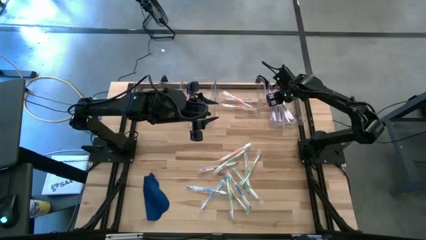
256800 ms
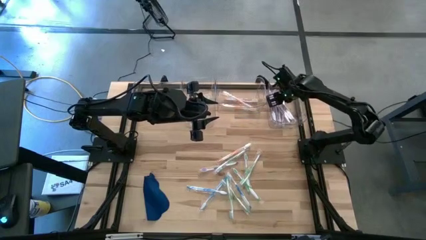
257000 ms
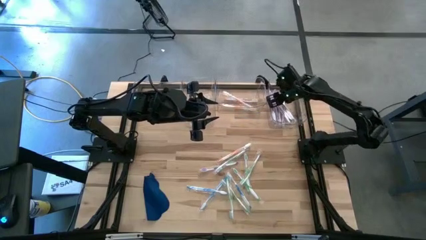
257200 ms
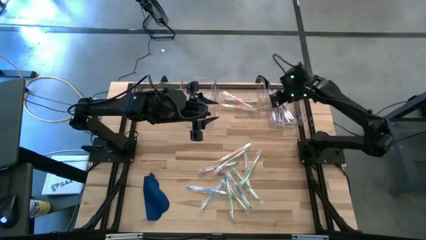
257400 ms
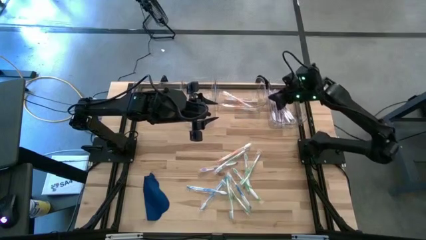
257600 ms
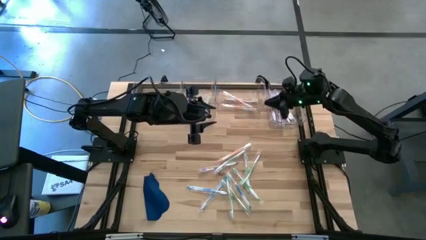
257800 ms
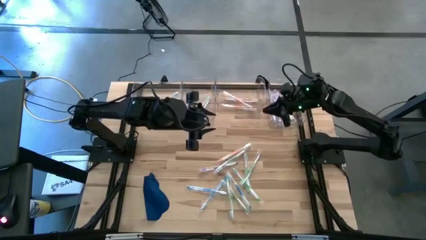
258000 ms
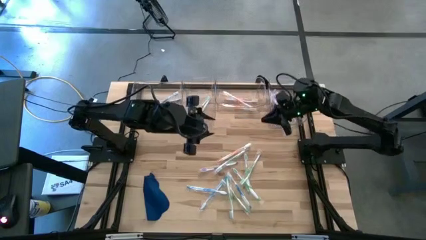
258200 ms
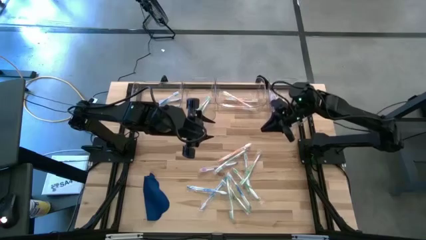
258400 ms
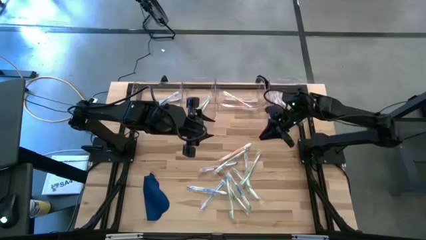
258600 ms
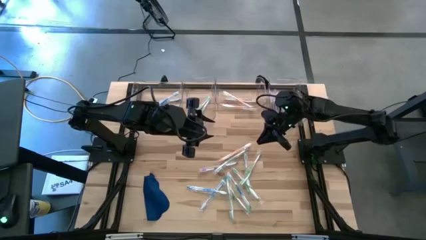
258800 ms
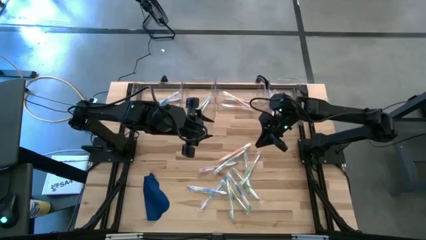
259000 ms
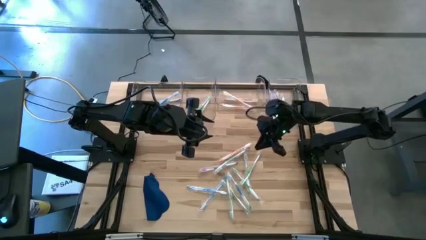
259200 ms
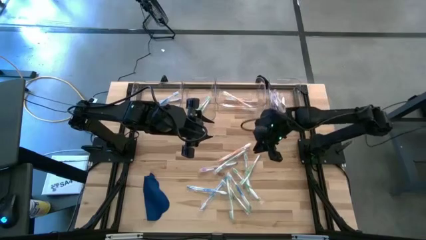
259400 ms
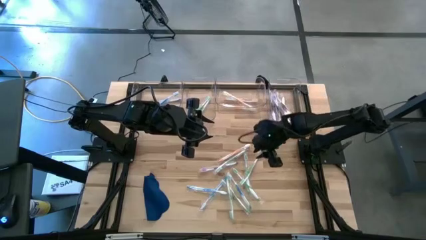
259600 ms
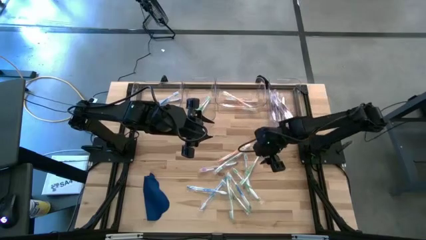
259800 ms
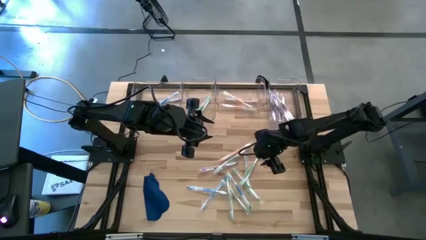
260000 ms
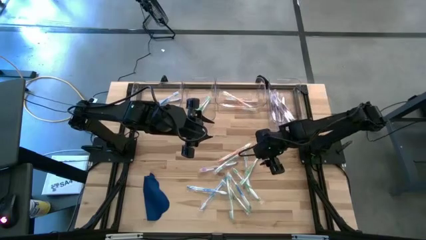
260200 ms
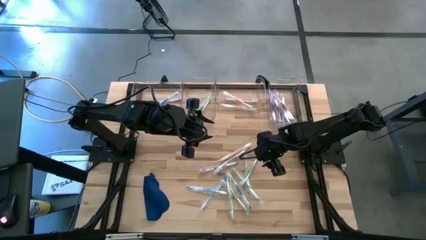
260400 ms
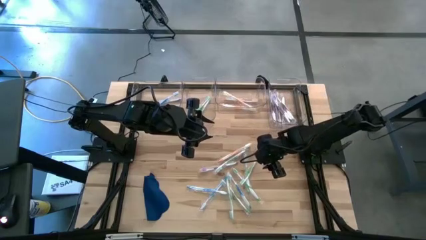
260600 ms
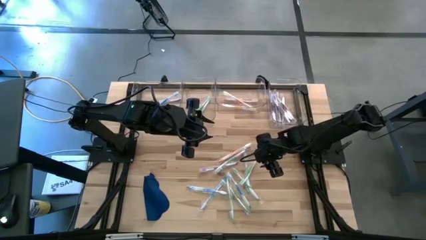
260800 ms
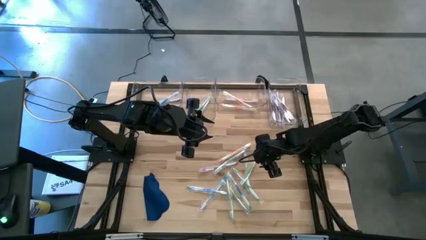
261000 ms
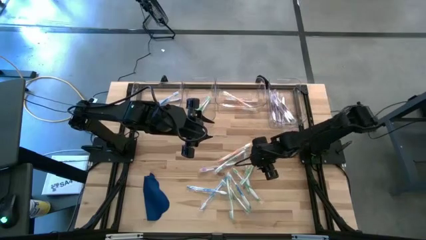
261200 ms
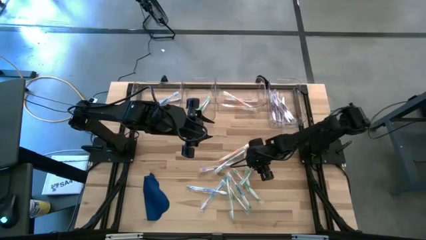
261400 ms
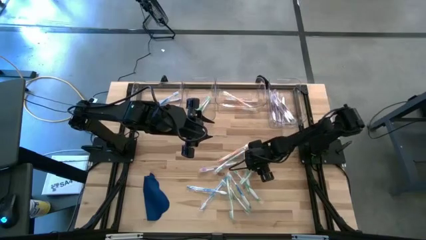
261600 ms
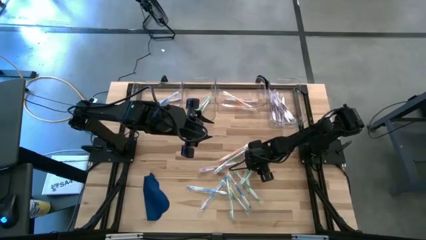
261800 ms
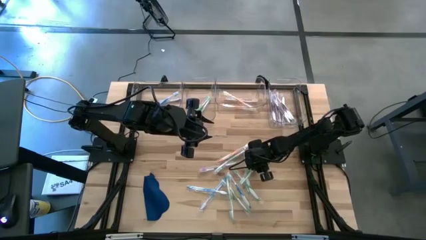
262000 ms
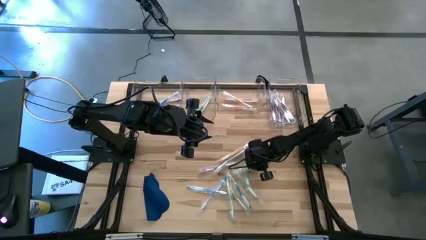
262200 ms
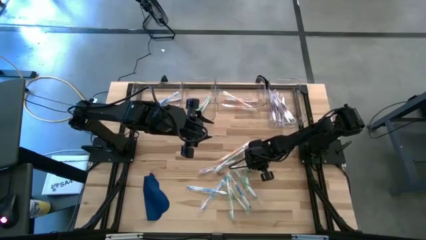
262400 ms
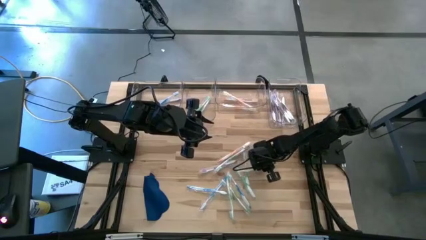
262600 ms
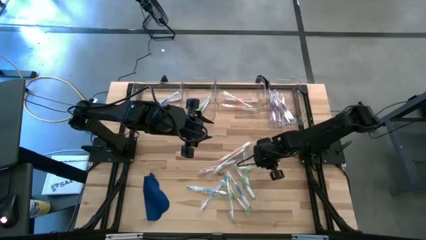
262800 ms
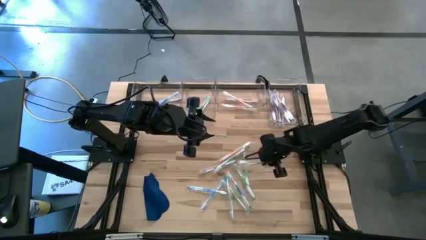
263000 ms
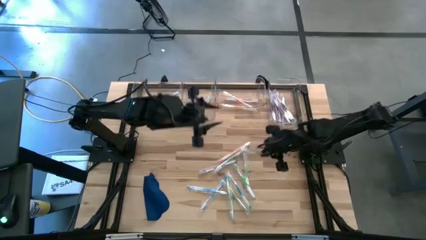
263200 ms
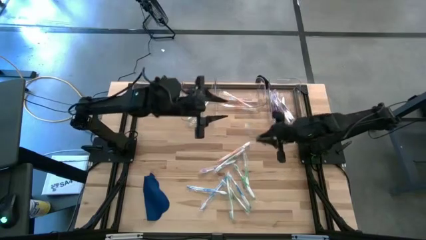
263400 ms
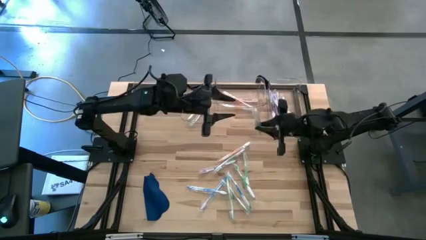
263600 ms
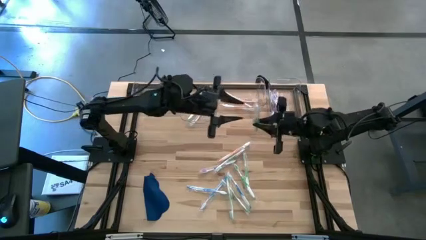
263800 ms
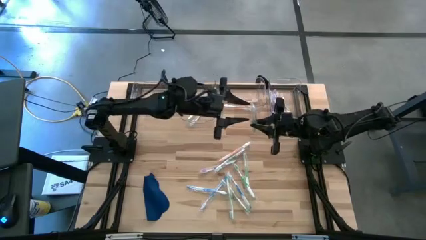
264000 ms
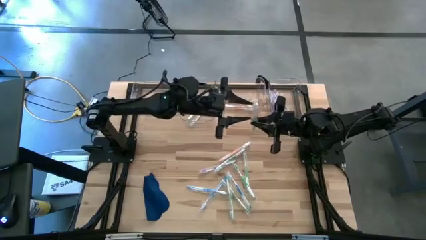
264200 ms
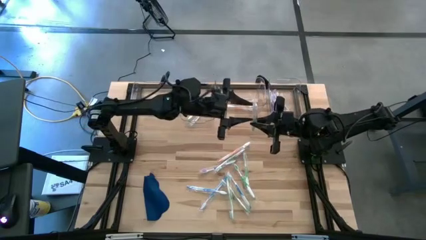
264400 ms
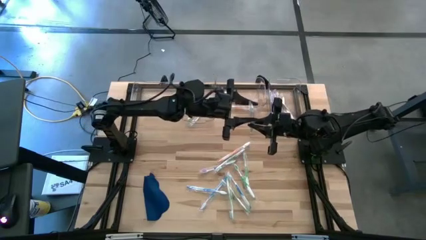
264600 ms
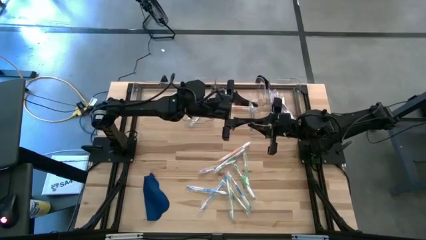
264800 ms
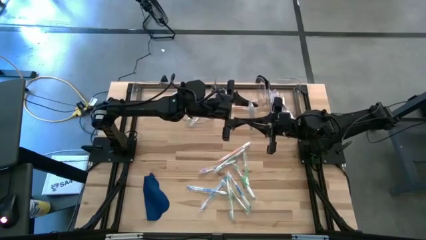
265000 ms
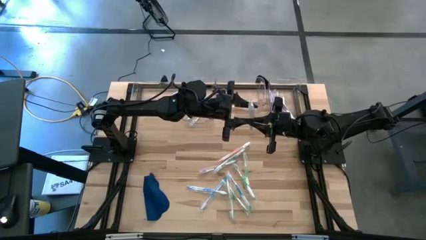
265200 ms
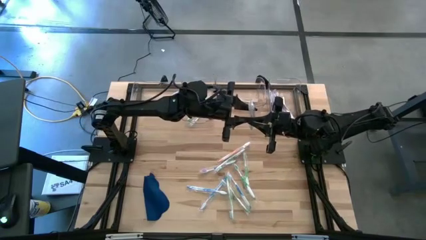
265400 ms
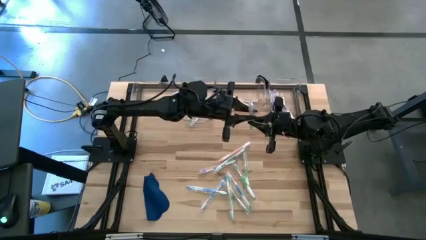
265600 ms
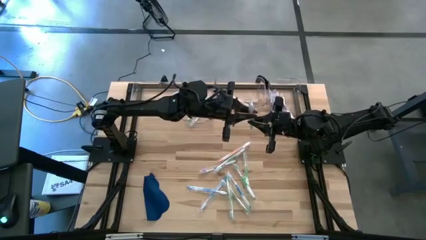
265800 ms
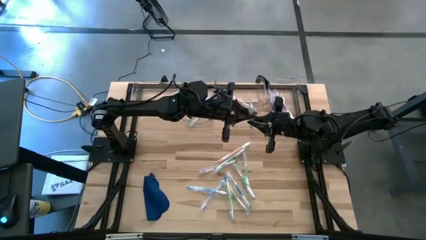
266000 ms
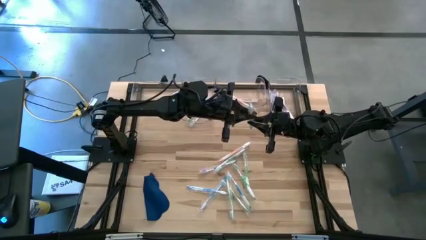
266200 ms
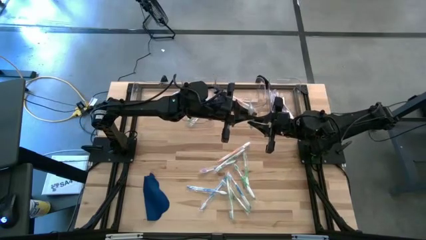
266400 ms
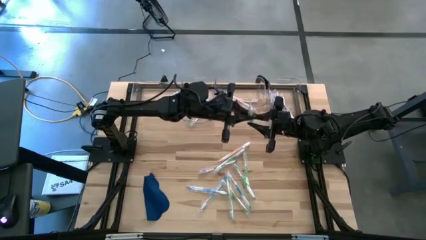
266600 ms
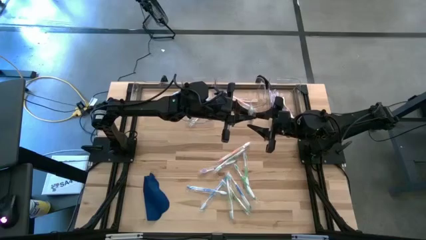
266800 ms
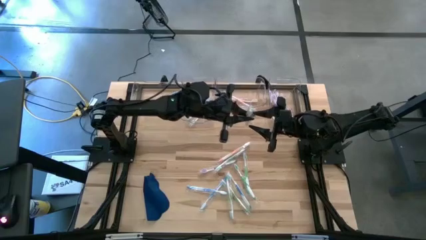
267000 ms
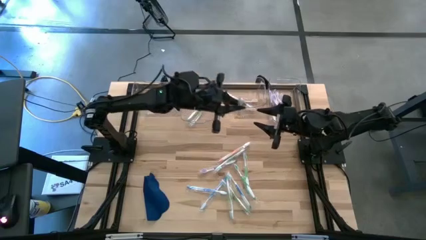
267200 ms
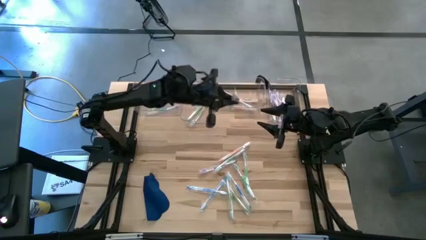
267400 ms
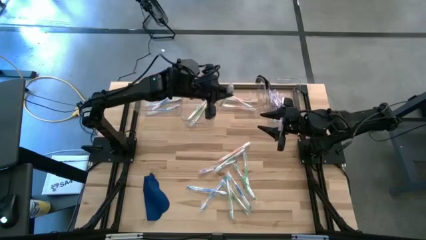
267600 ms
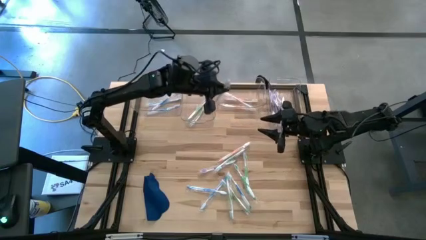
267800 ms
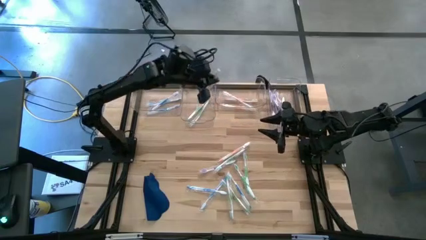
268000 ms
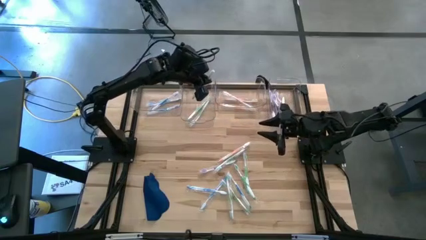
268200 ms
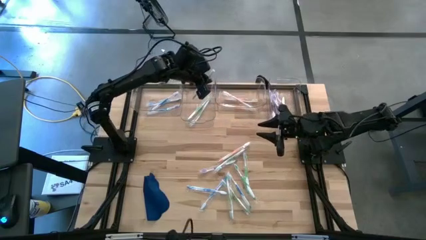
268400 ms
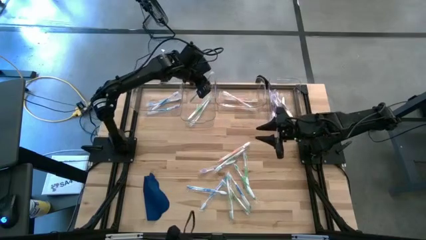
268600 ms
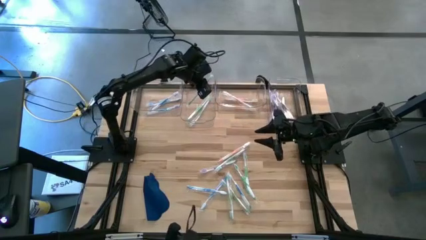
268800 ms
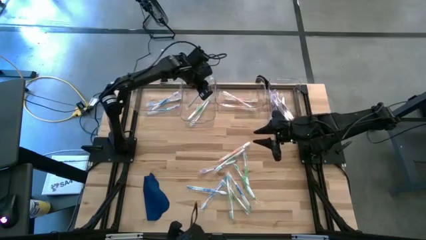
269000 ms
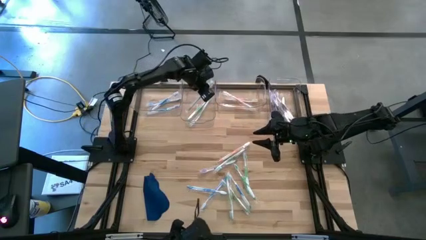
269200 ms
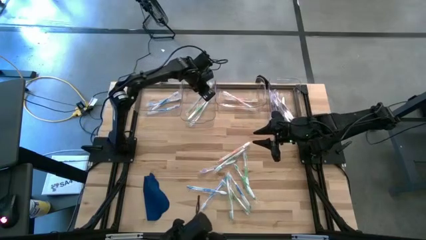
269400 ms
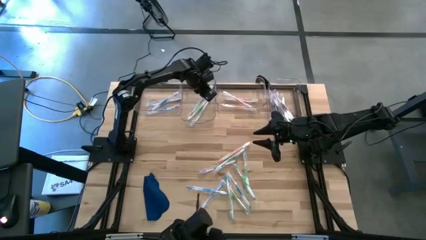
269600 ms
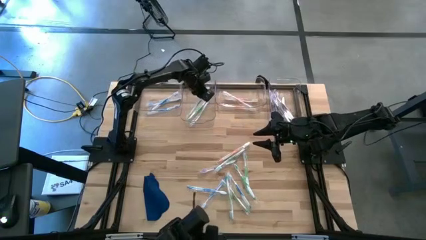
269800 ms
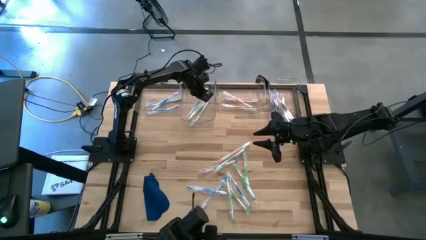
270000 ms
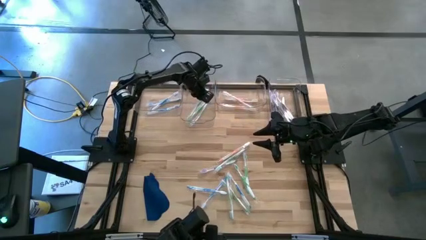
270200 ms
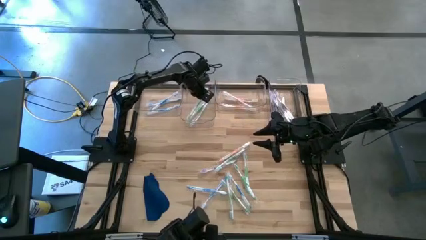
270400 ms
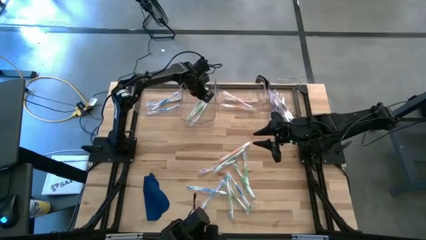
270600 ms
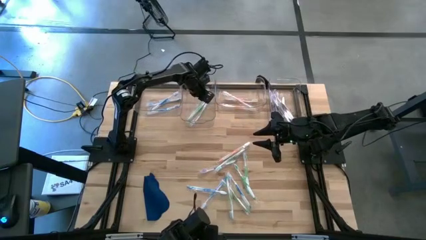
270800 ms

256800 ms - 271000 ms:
Task: Pick & Place Toothbrushes
Put the green toothbrush into the middle left transparent bin

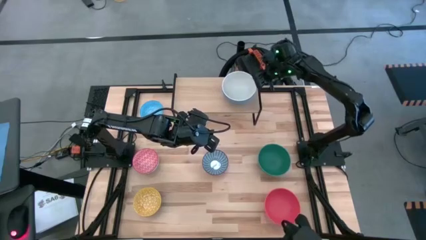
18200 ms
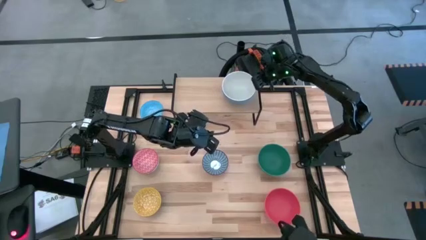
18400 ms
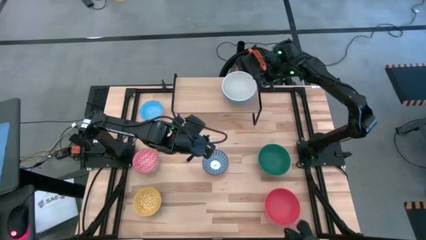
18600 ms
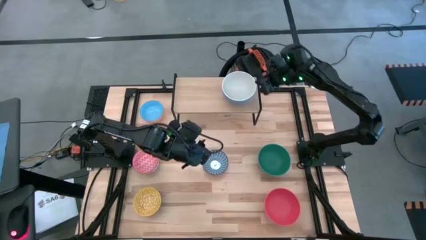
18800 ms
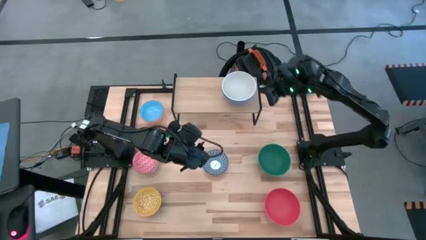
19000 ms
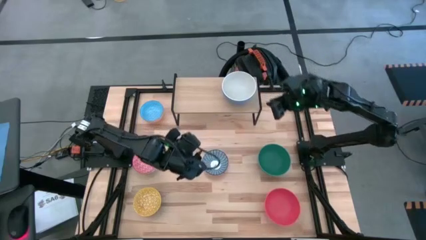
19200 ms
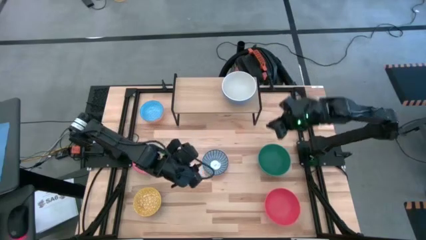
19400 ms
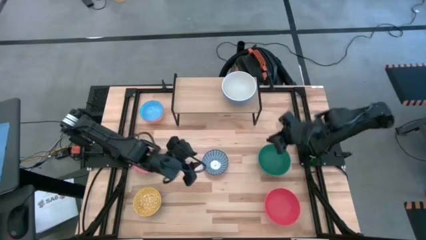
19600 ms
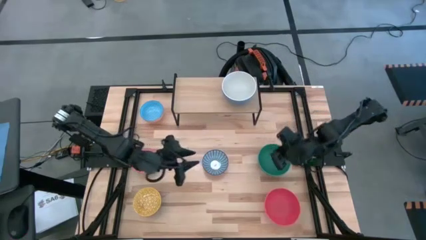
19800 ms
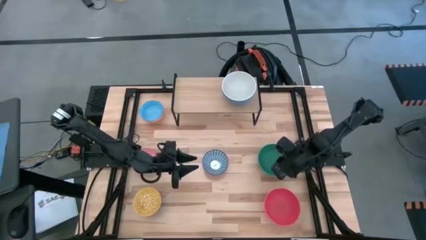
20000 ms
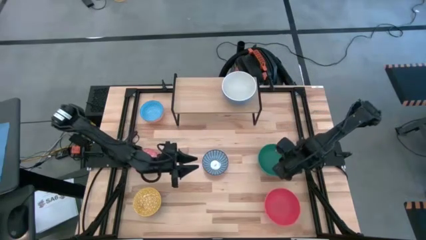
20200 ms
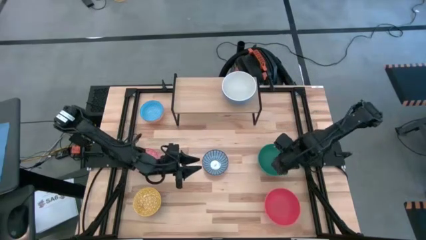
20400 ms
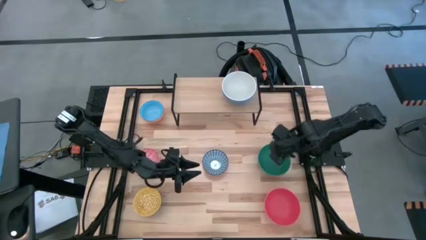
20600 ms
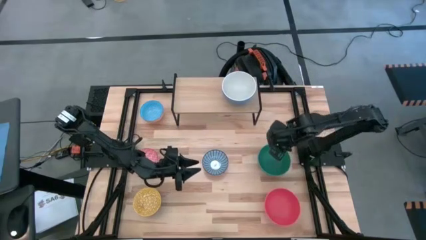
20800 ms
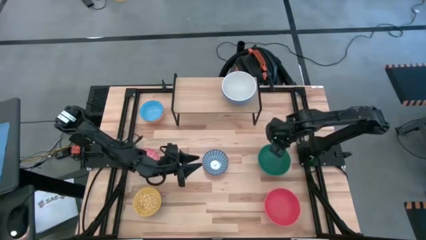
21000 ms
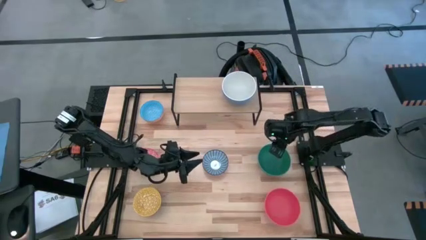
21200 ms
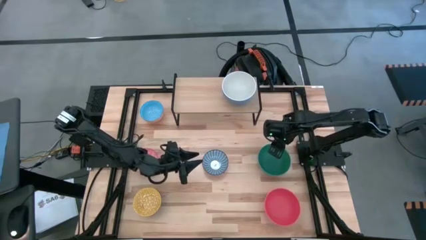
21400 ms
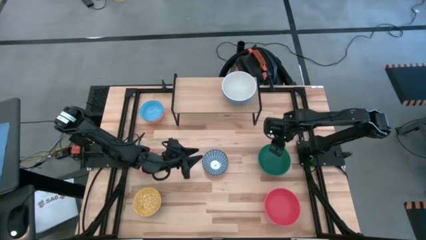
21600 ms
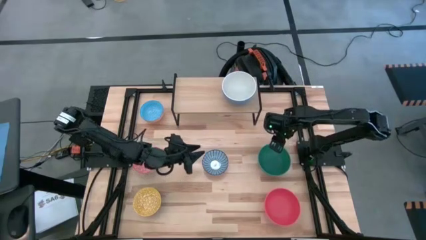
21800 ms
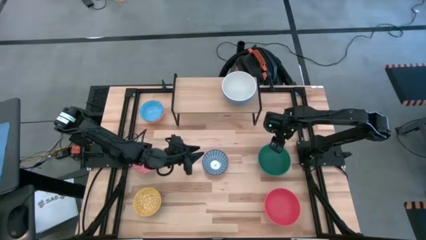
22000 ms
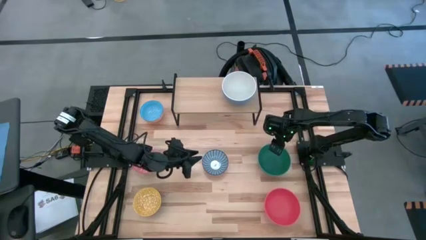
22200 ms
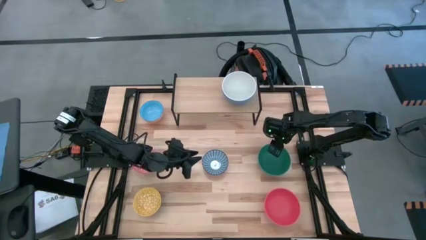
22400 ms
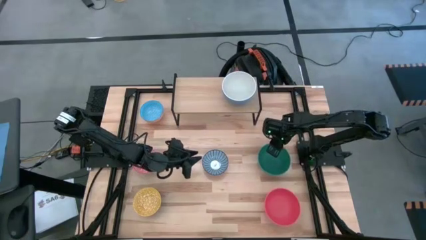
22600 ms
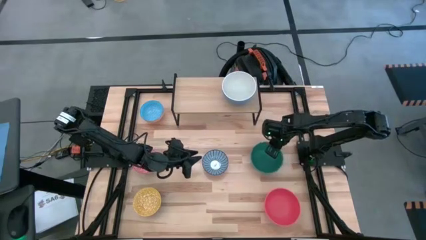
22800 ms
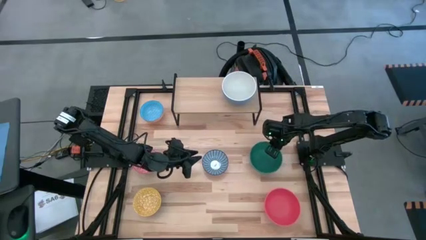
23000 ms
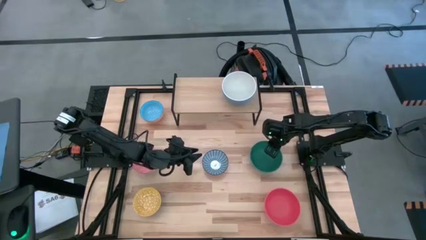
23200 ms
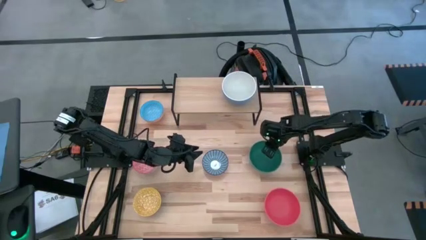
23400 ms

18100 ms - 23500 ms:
Task: Place and stack bowls onto a shelf
Stack the green bowl on top of the white bowl on the shelf
